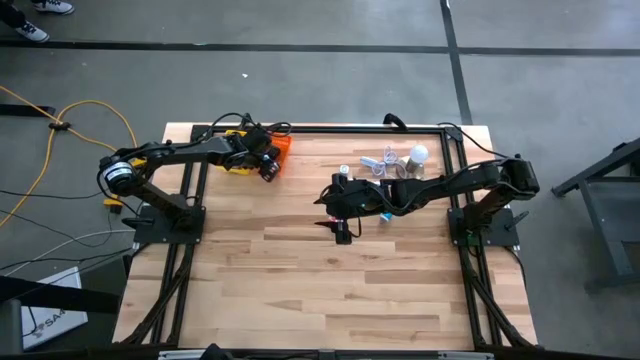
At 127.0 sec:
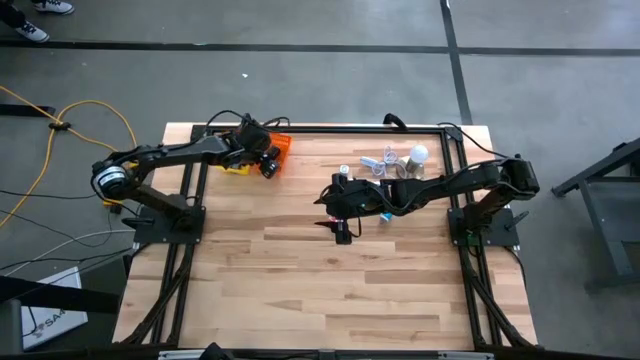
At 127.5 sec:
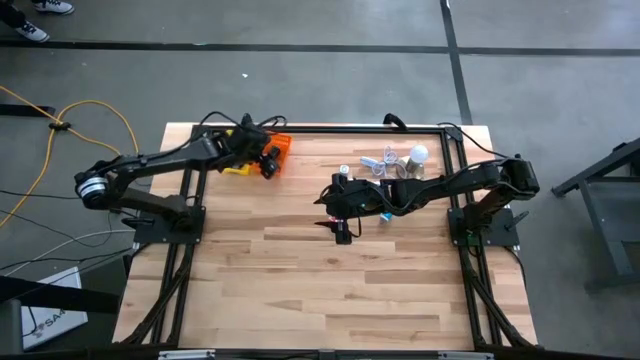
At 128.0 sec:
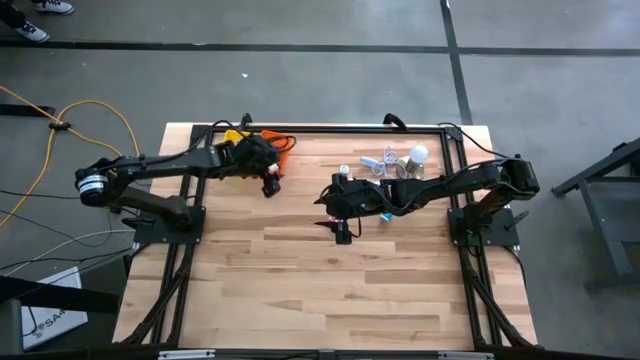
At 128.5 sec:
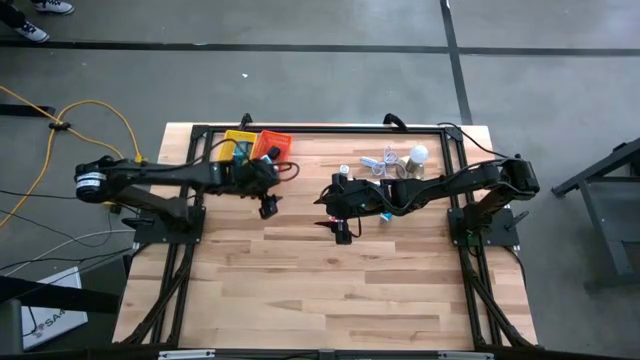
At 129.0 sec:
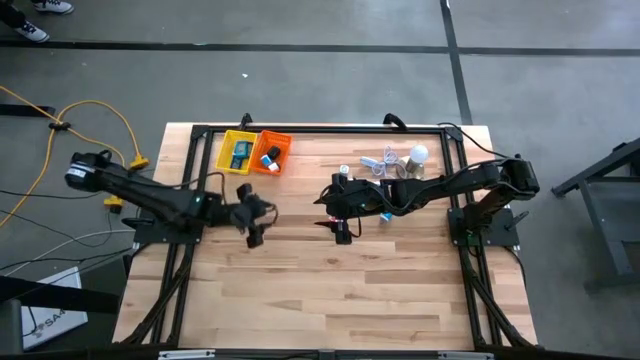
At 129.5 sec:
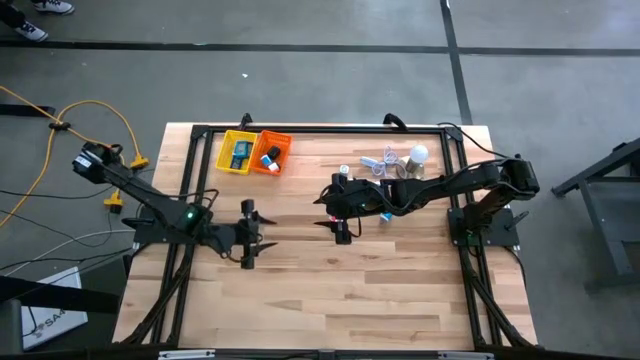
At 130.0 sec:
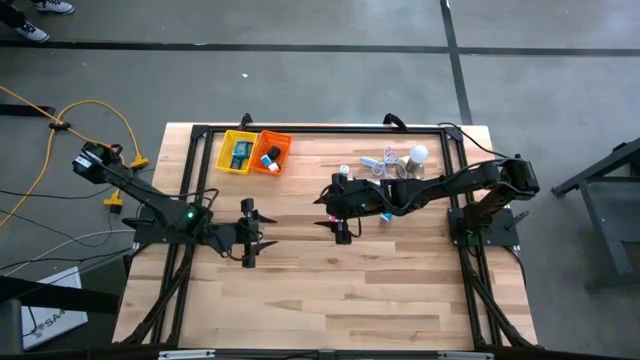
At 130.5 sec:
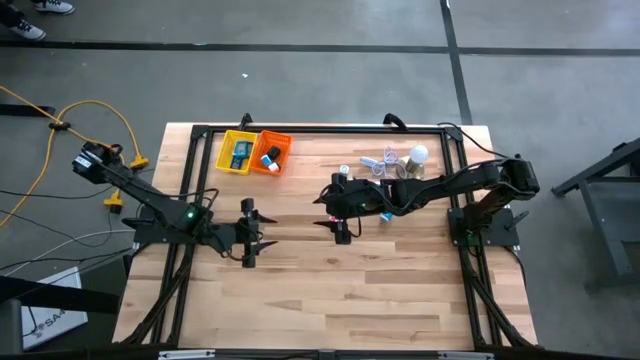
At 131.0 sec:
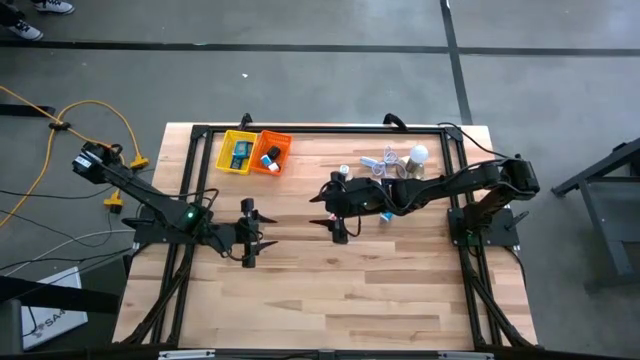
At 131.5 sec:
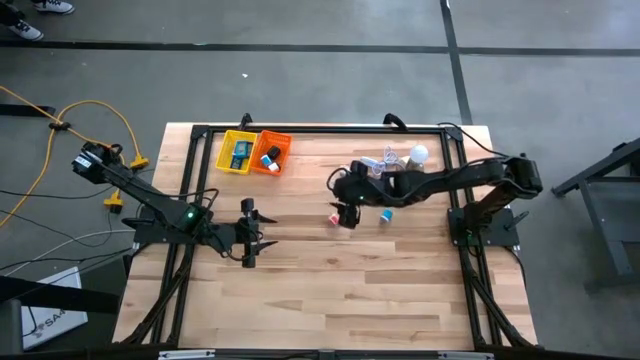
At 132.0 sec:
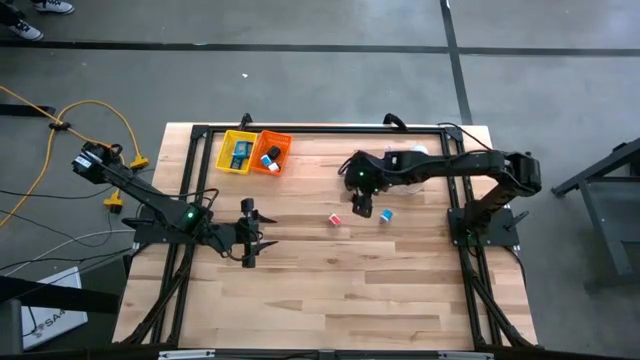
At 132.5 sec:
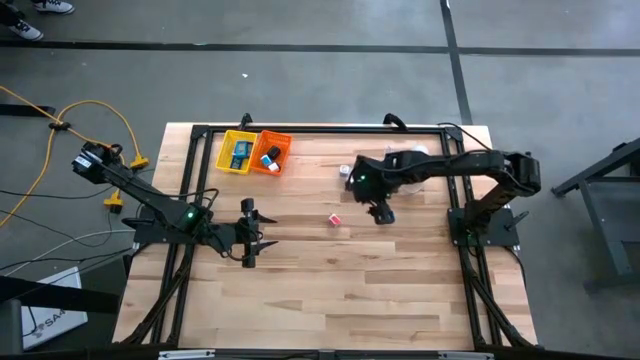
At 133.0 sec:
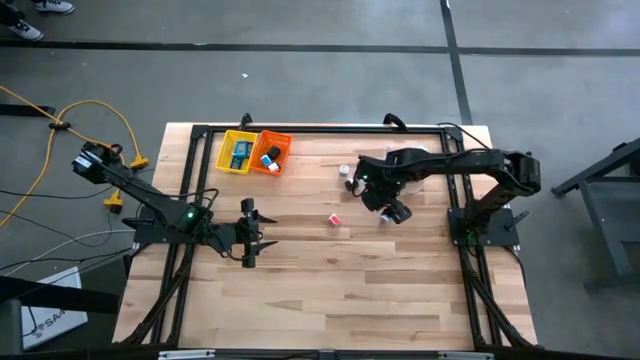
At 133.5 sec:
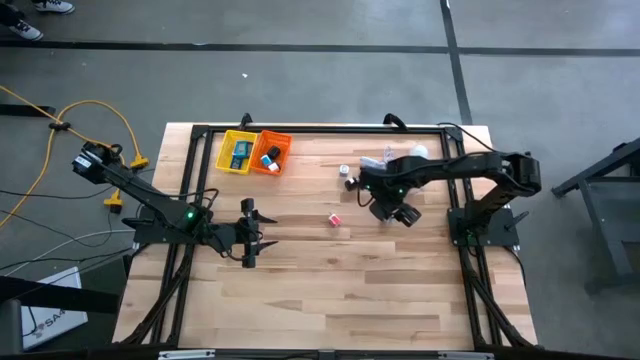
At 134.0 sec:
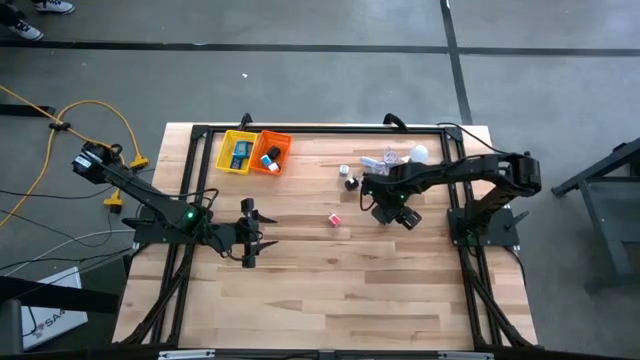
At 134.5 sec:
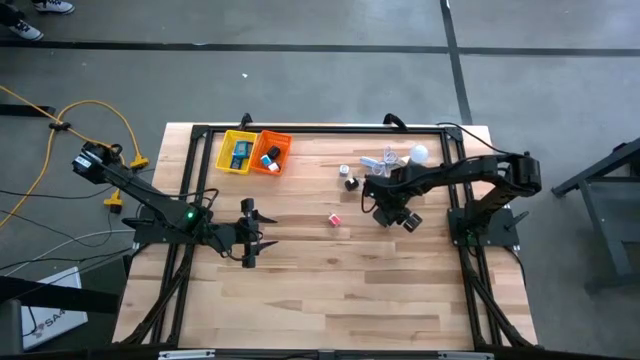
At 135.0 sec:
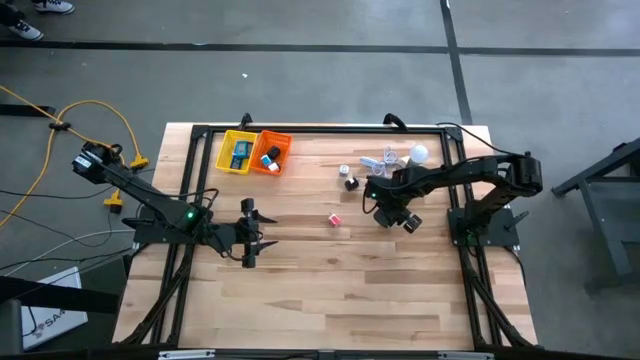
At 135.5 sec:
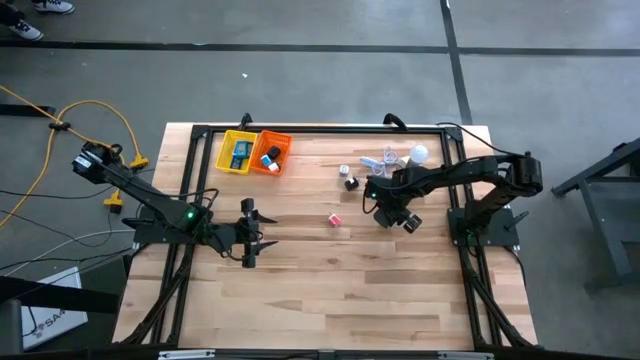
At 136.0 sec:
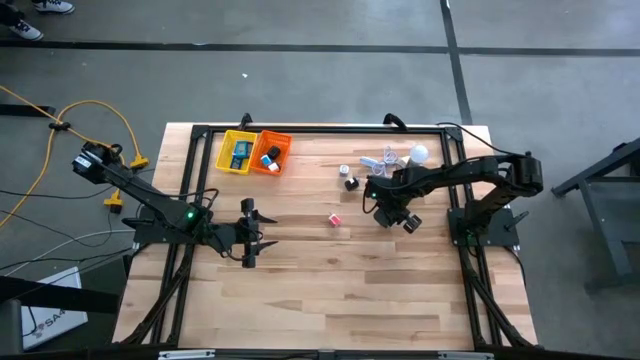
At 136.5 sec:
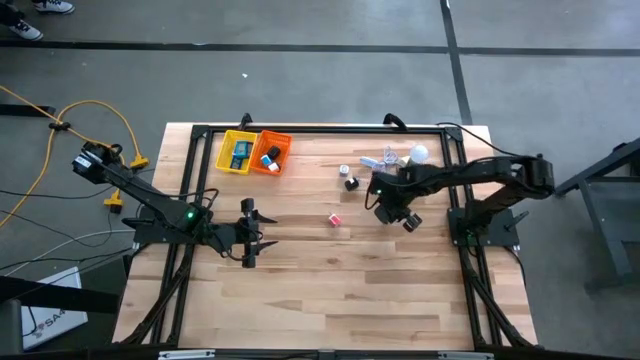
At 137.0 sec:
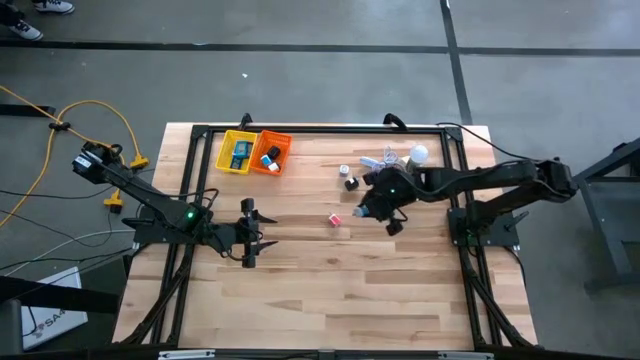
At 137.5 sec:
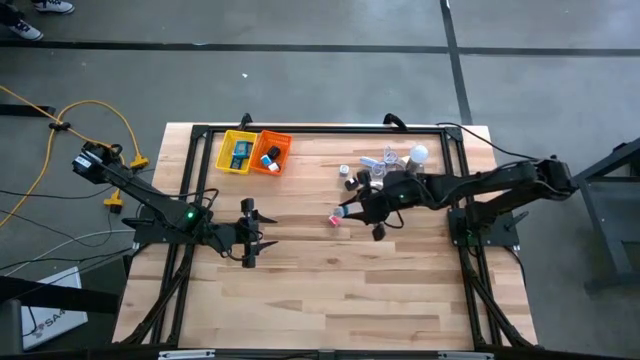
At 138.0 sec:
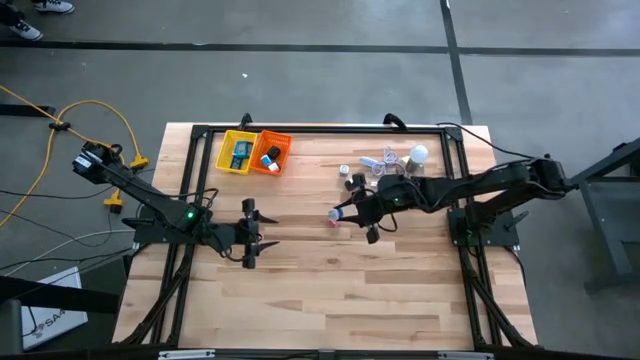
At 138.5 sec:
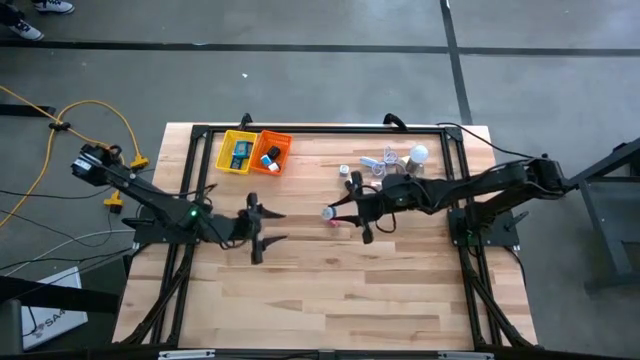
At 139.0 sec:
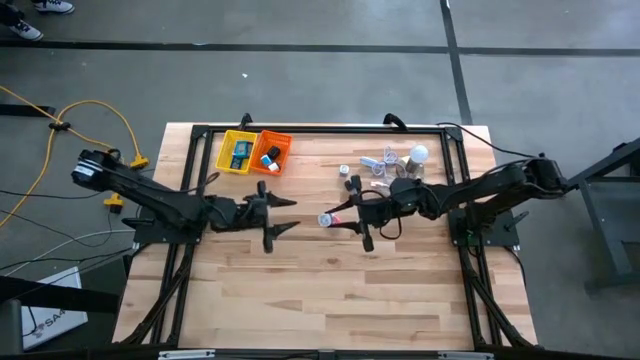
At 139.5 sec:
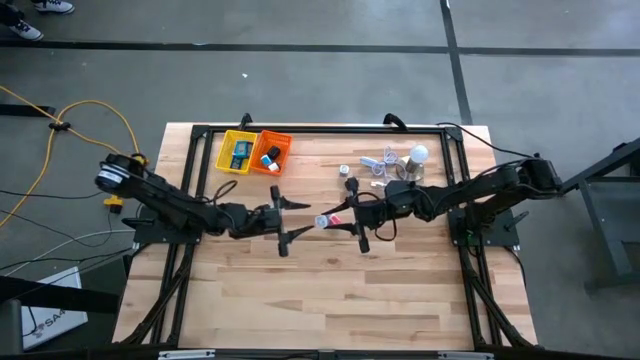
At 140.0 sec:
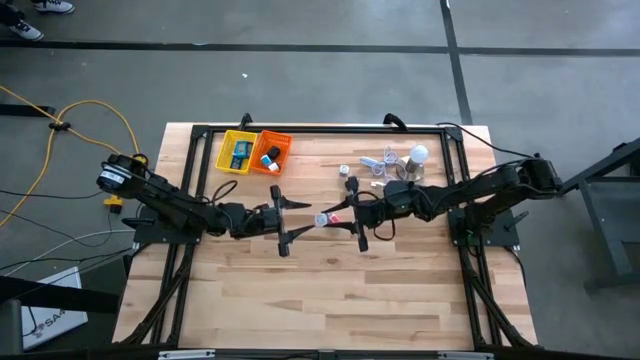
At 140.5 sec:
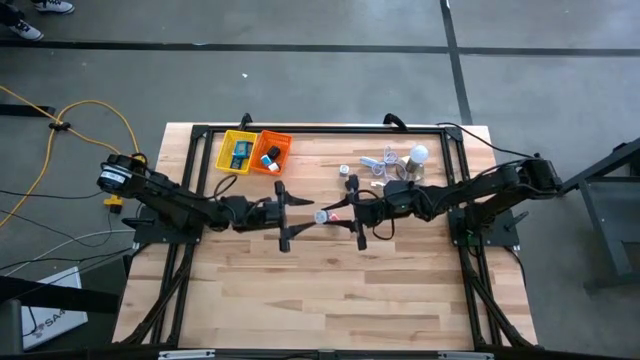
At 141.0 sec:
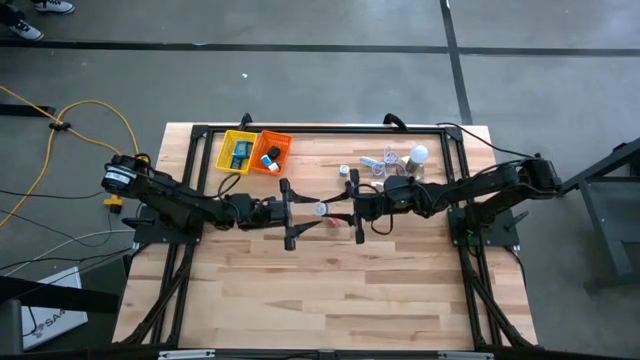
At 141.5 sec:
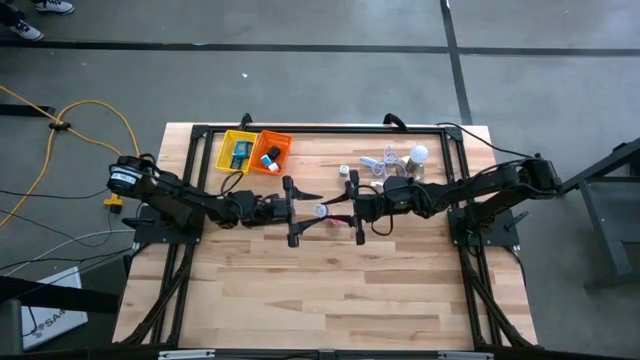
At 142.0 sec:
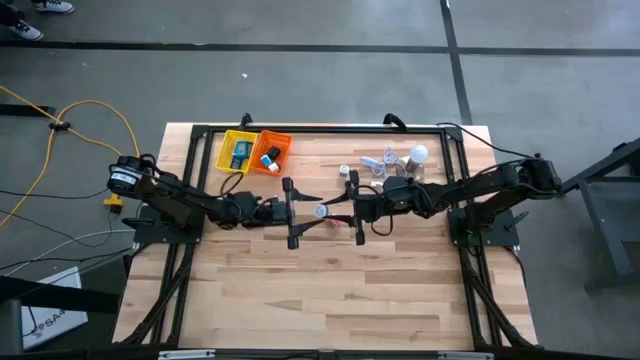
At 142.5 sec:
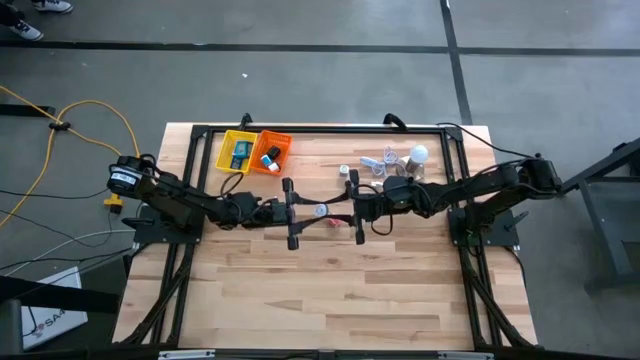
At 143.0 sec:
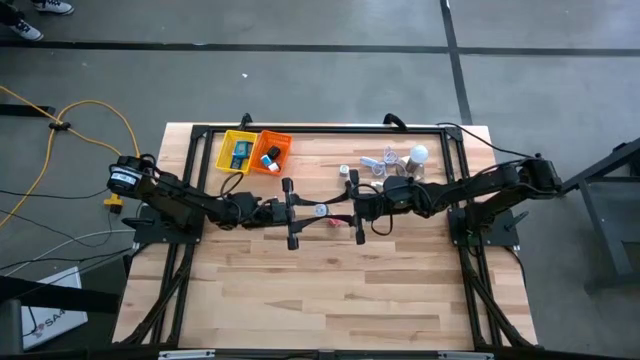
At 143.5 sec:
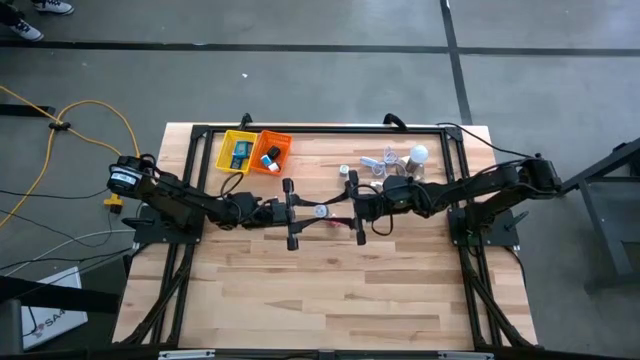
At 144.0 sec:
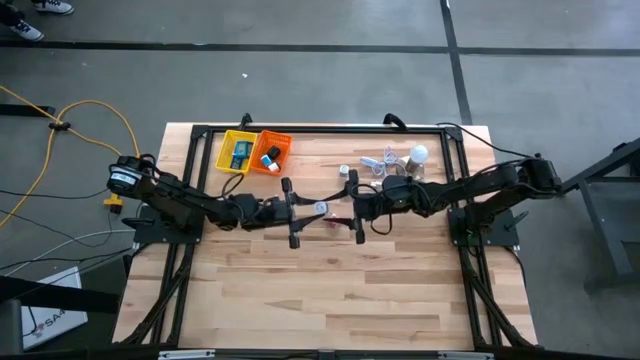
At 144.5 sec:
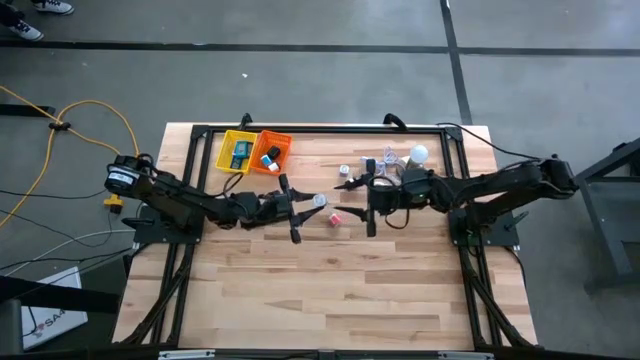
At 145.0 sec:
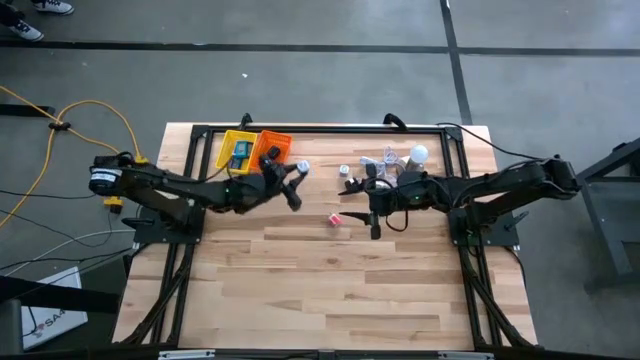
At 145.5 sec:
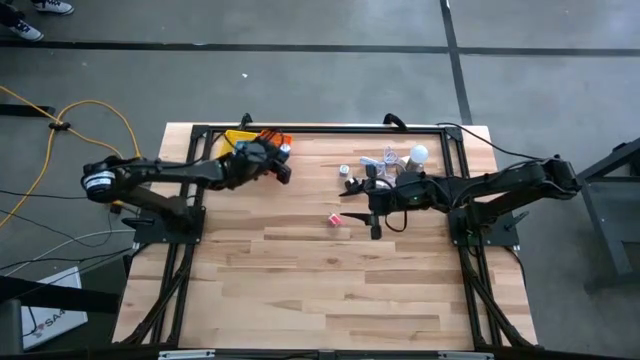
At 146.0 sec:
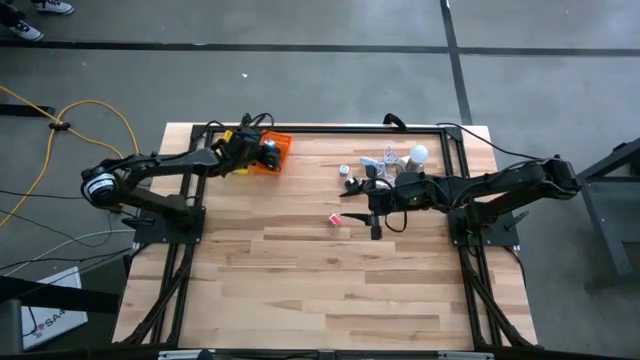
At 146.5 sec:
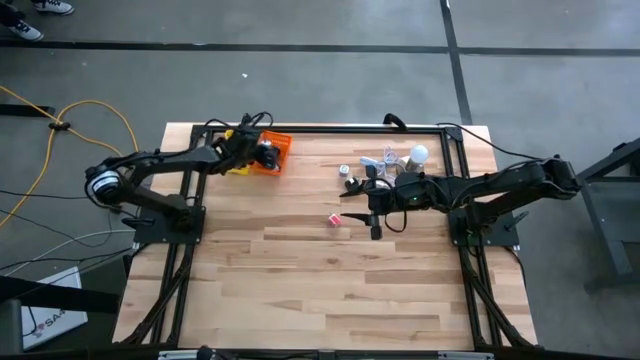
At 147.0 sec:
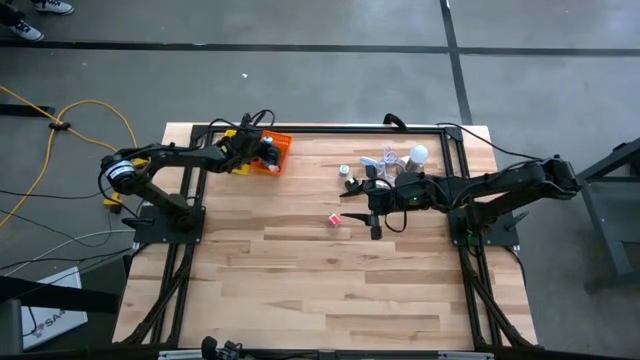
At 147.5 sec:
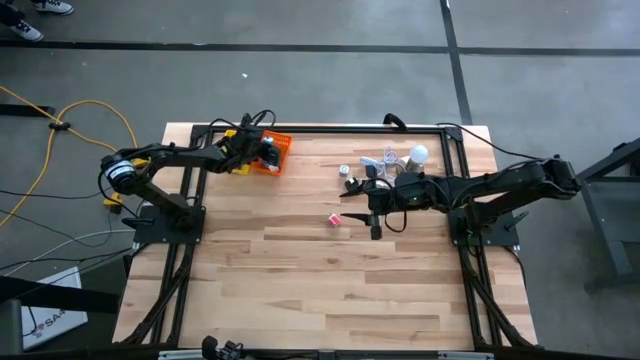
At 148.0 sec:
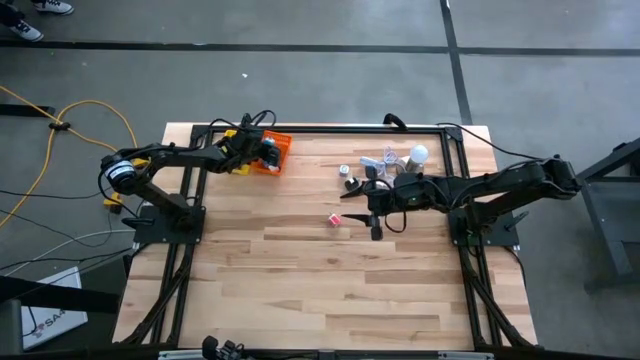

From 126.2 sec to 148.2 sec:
Task: Pick & Place Office items
Put the blue adapter into the orange basket
